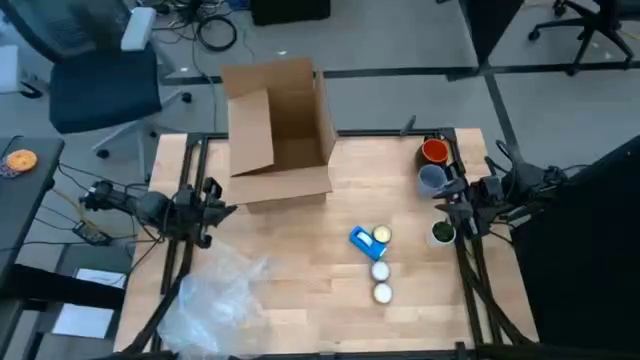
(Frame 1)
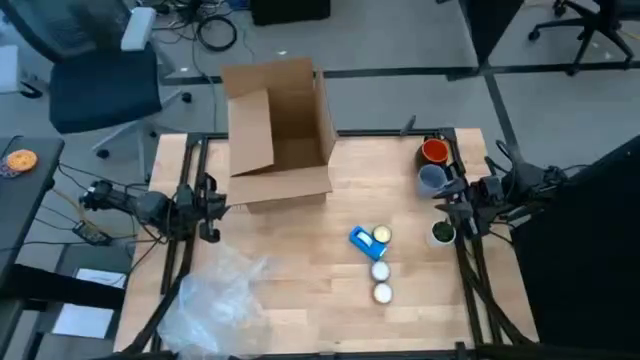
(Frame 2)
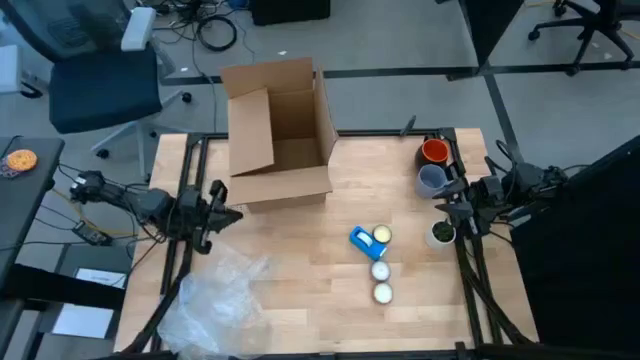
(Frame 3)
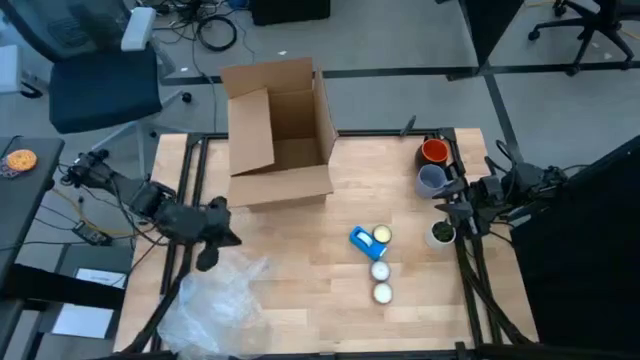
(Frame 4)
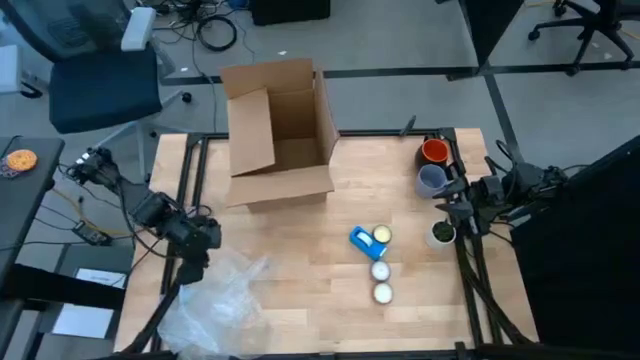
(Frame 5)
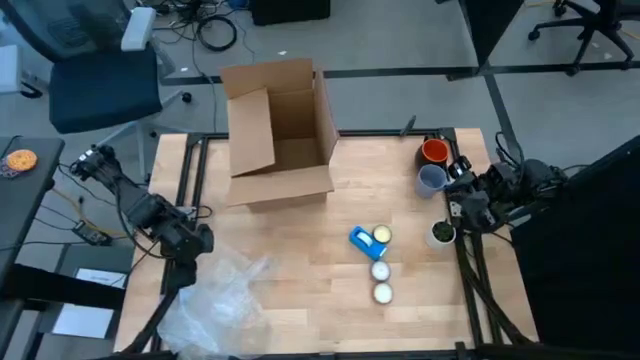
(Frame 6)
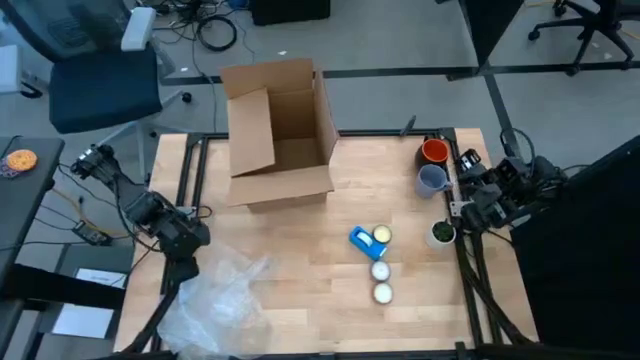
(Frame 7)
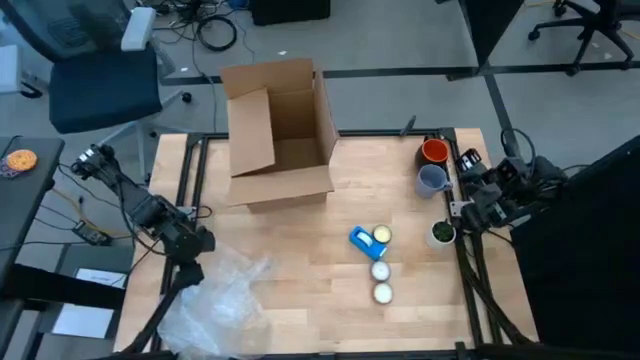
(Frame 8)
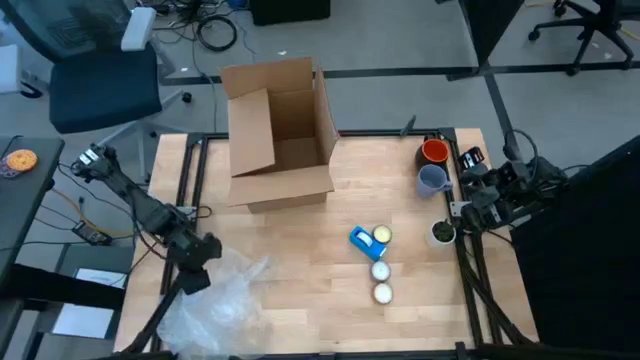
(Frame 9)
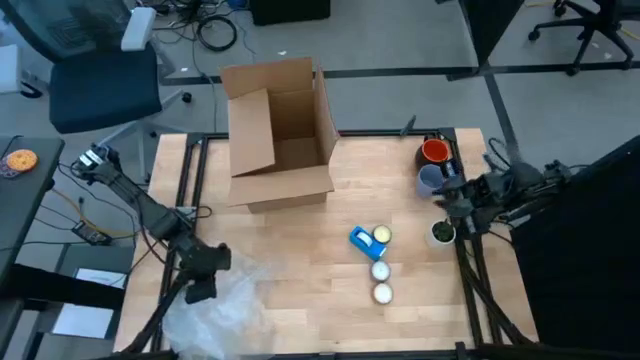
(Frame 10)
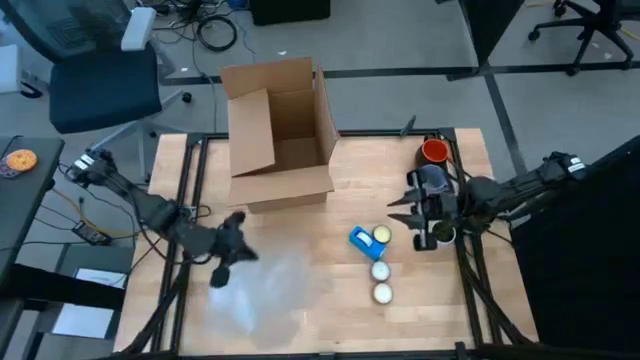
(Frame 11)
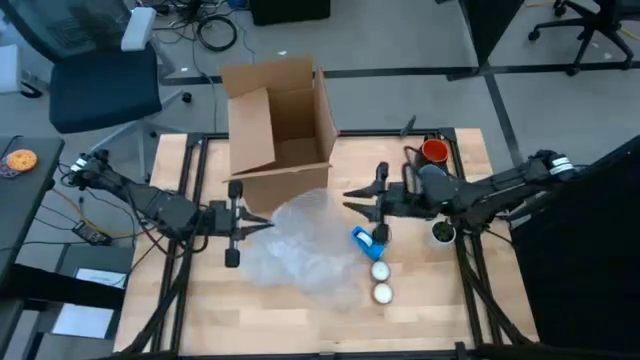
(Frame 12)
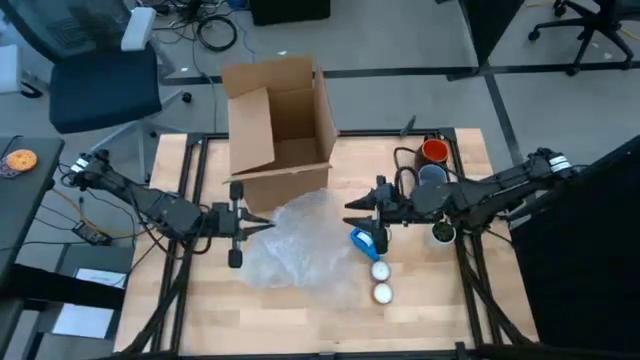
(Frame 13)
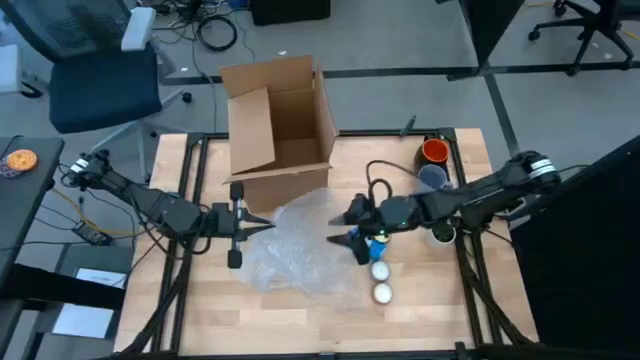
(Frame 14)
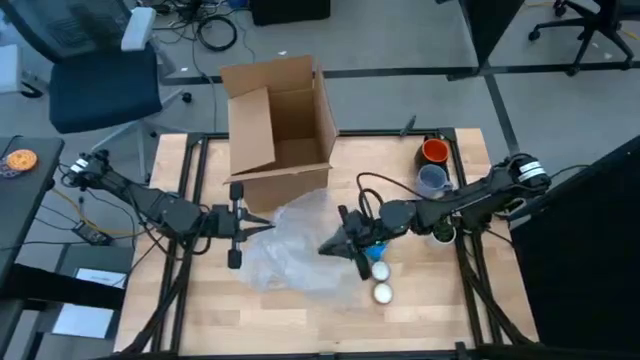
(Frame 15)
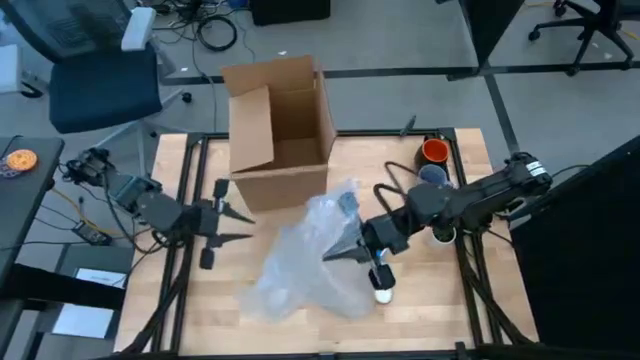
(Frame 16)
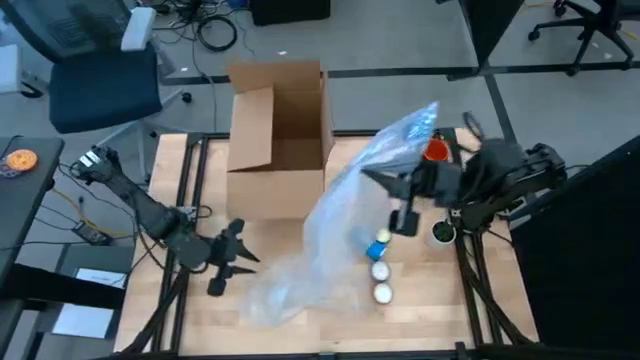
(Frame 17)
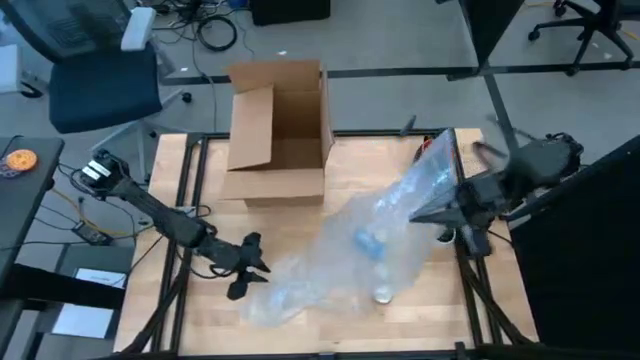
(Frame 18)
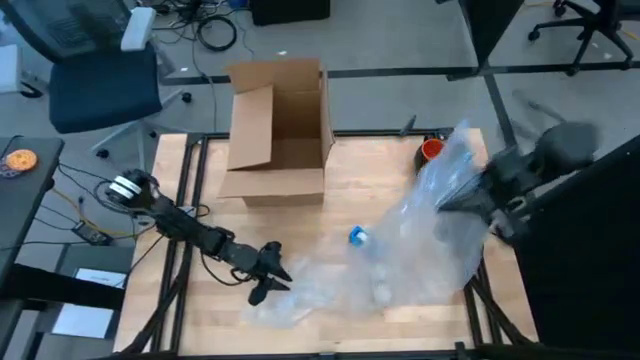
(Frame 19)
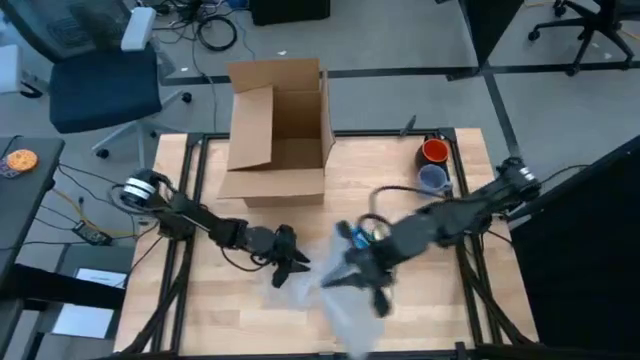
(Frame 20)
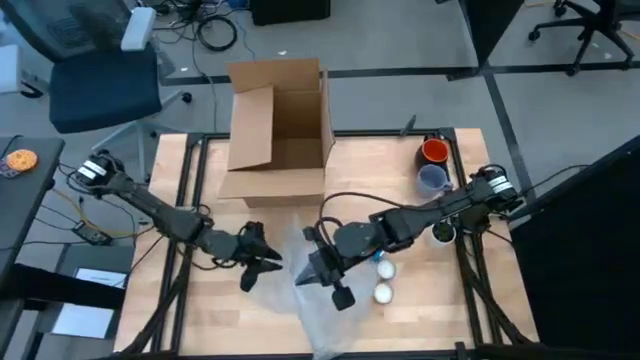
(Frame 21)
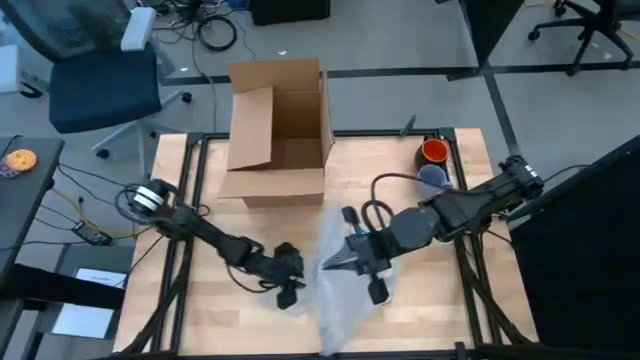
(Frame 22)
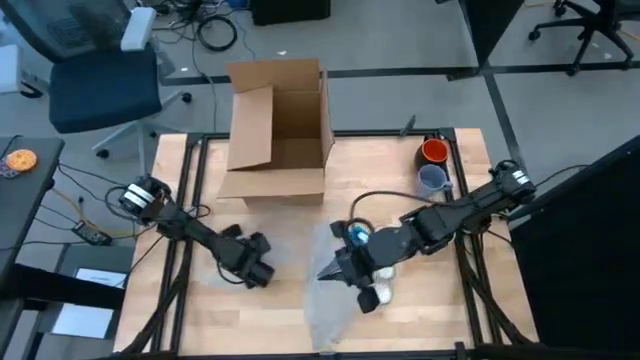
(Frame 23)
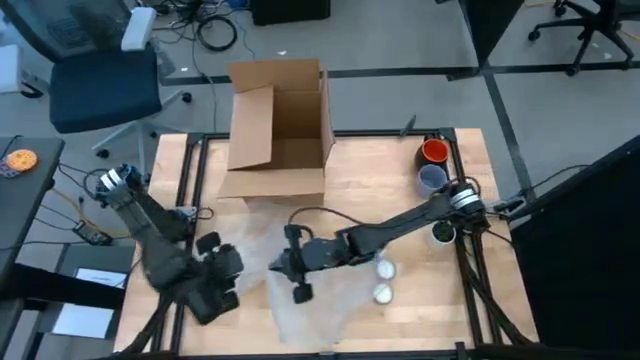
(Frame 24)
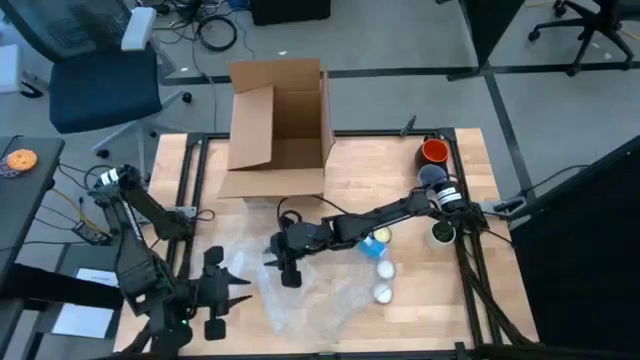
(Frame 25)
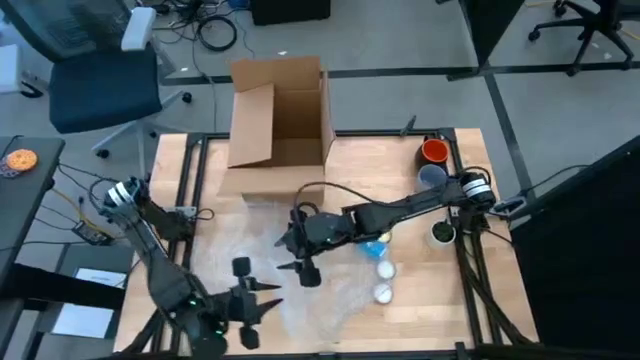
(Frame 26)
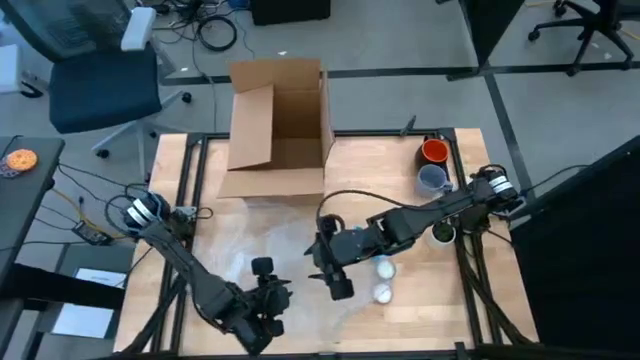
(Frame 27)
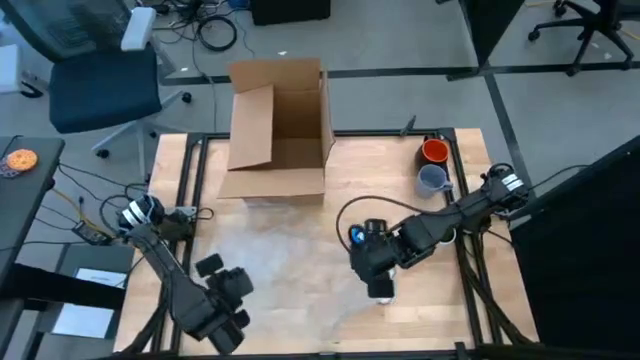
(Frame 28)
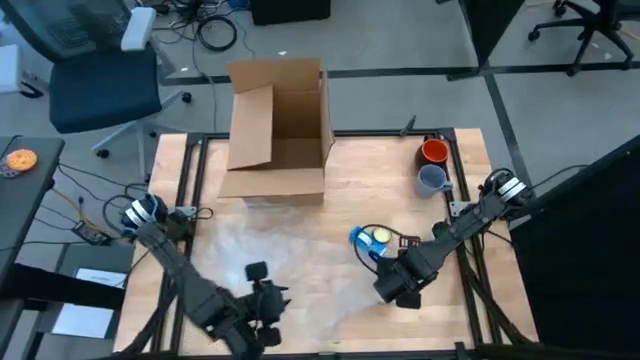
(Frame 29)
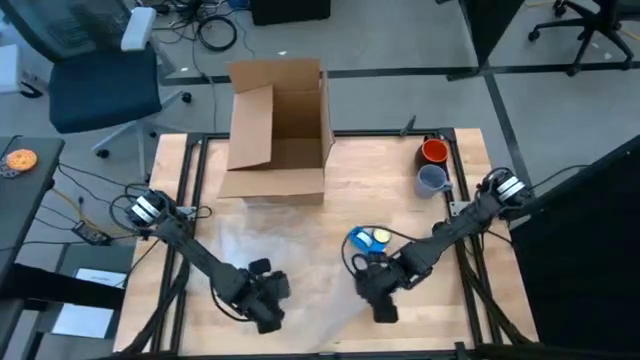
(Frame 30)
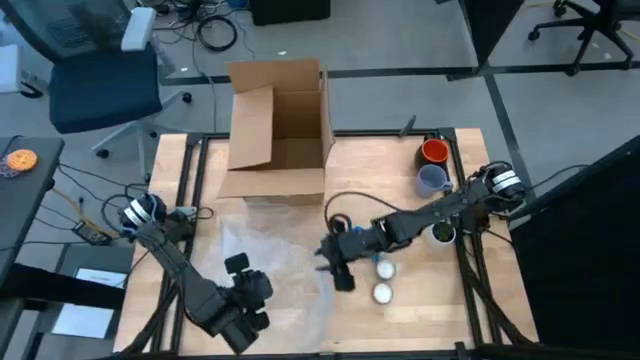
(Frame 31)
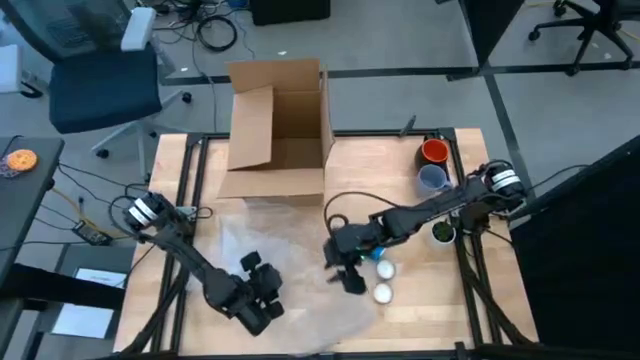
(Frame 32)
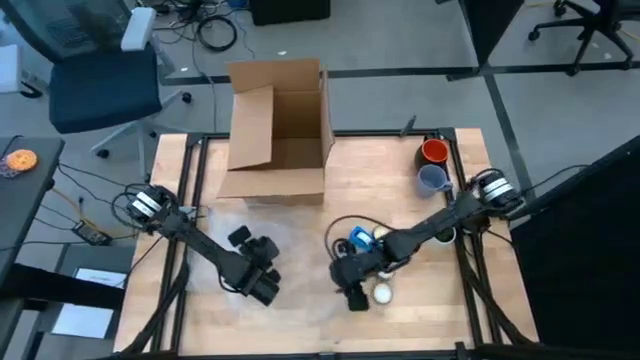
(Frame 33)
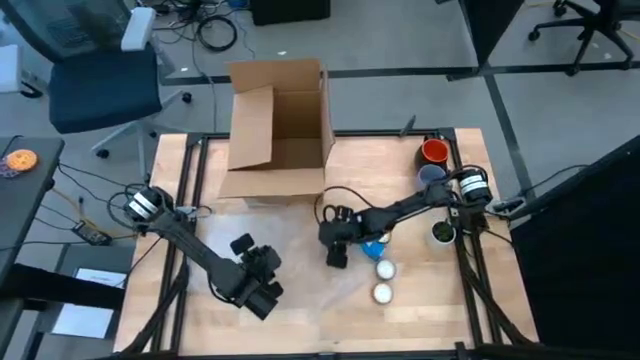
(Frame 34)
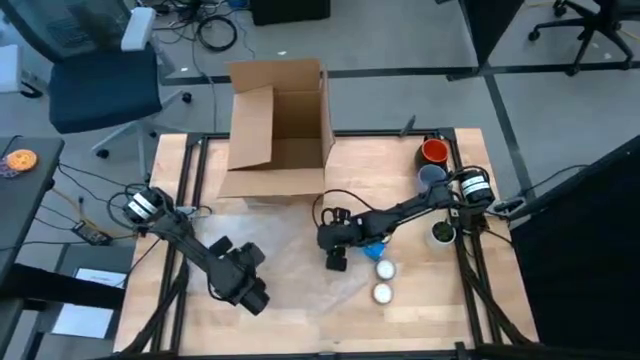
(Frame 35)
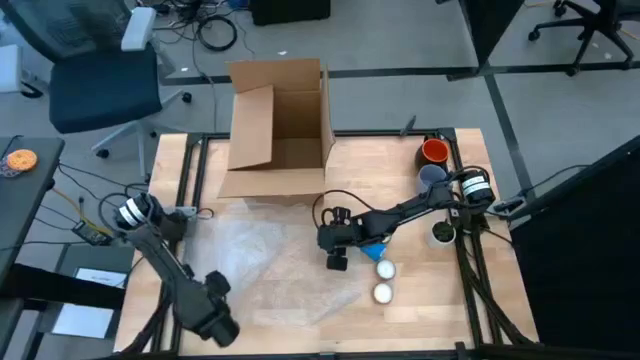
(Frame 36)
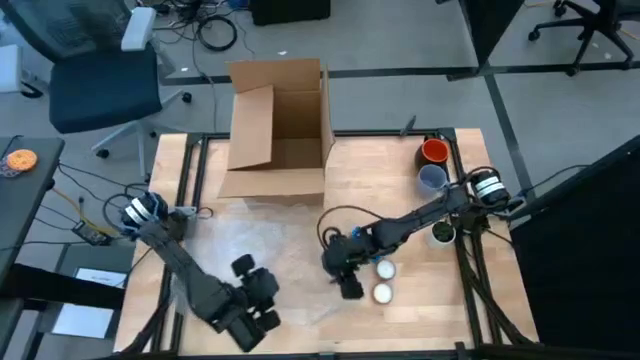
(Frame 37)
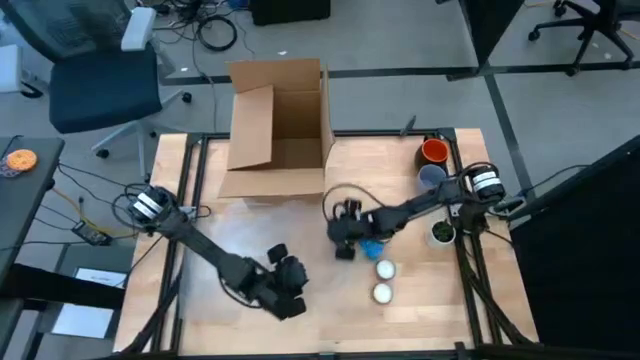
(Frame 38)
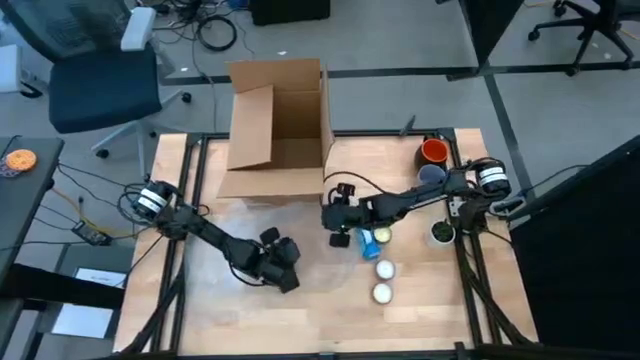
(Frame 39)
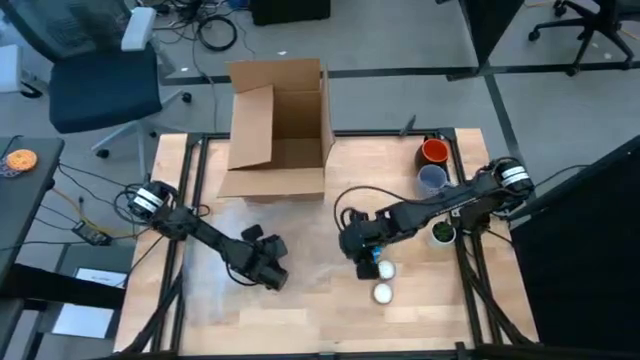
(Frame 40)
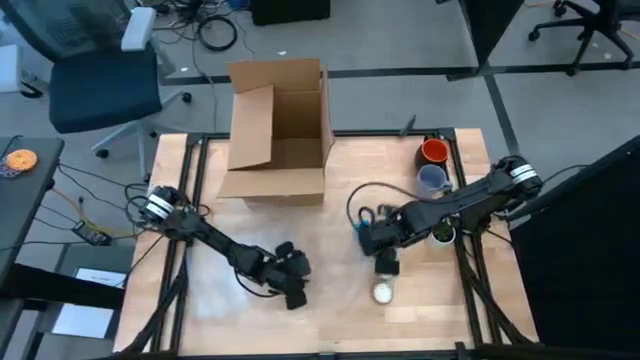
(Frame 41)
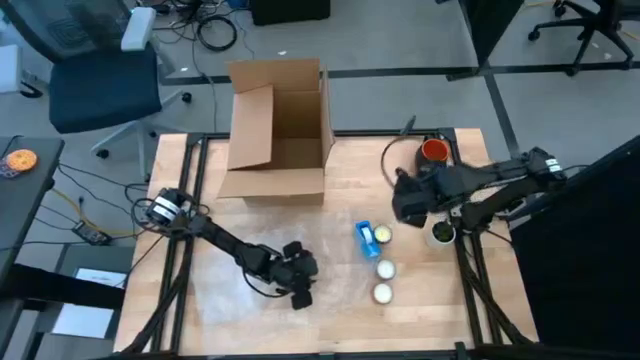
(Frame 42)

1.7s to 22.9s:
Task: wrap mug
Wrap the blue mug with the bubble wrap
